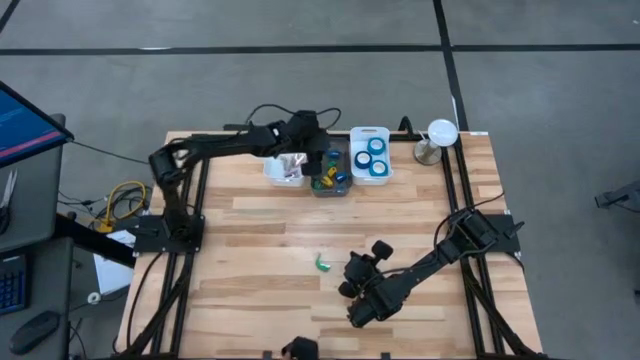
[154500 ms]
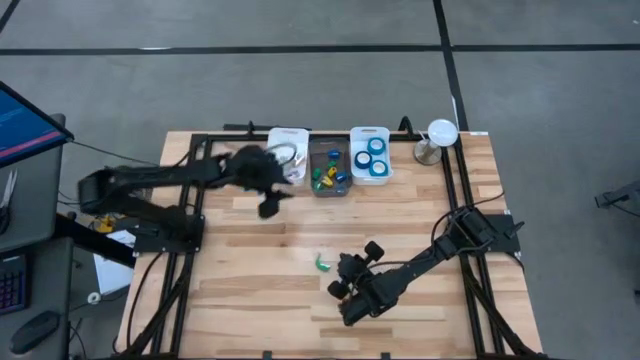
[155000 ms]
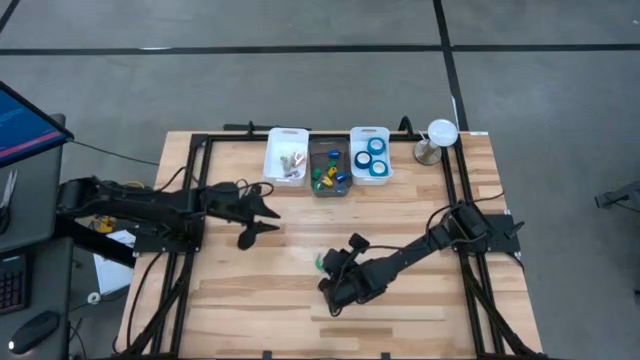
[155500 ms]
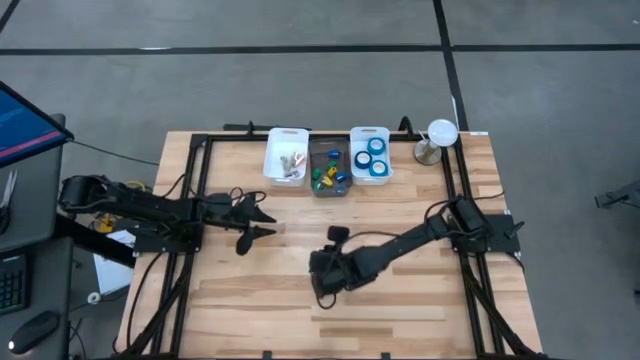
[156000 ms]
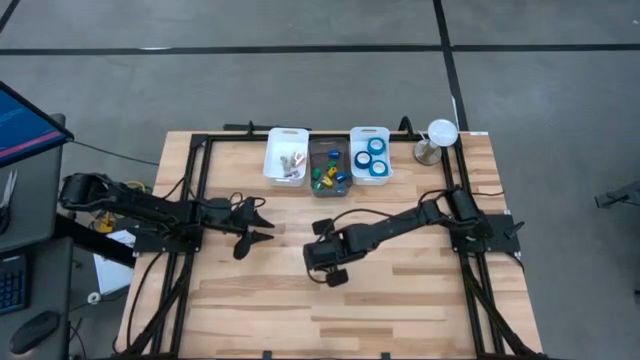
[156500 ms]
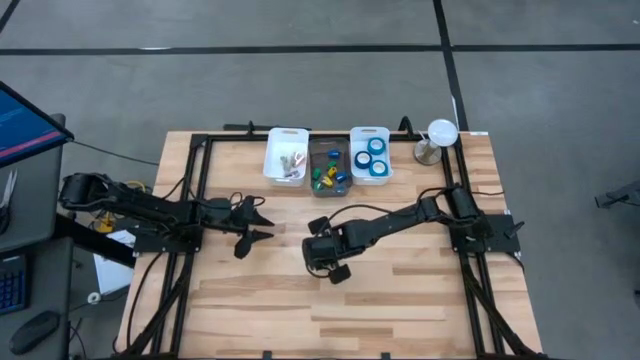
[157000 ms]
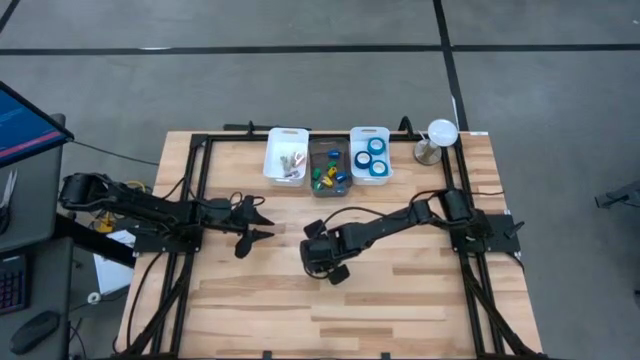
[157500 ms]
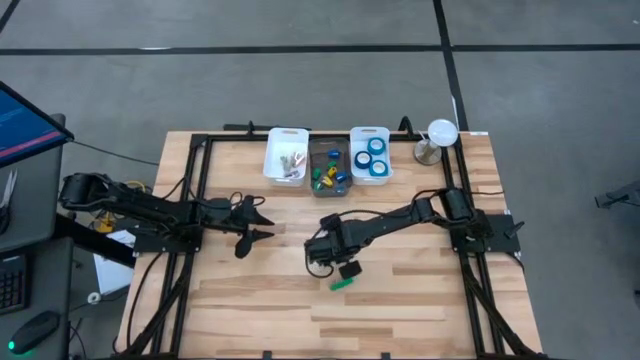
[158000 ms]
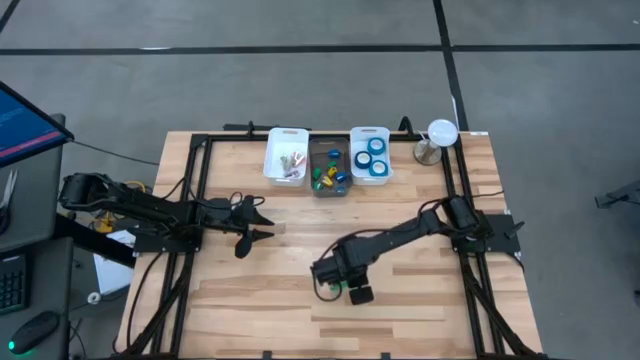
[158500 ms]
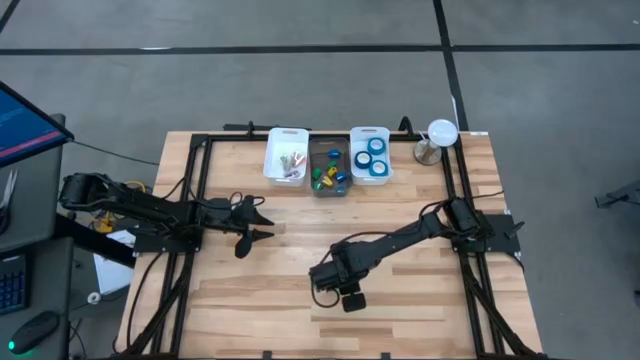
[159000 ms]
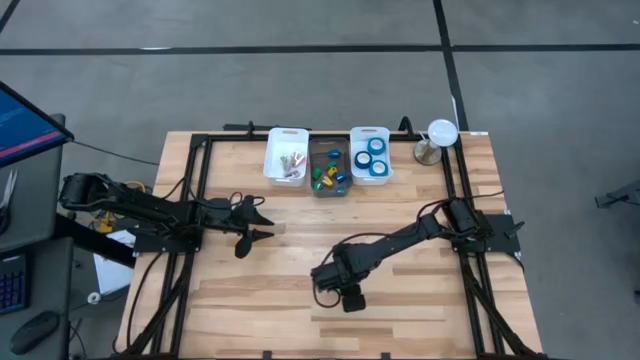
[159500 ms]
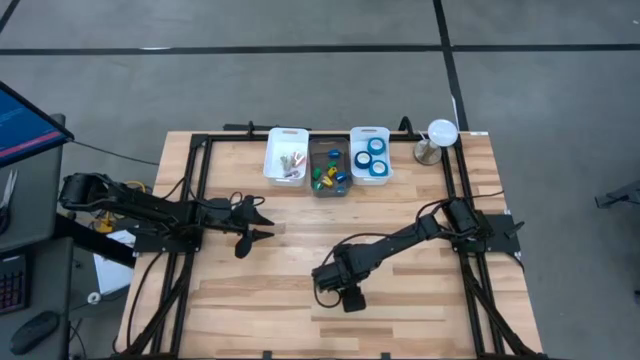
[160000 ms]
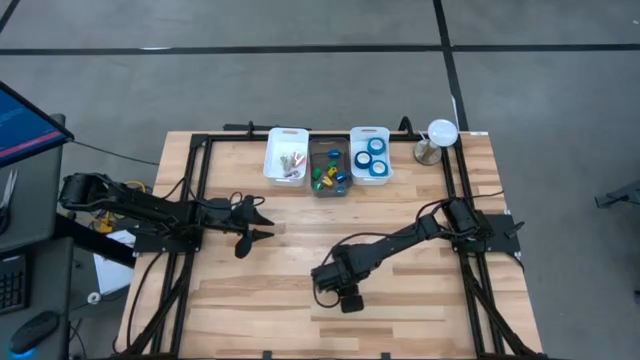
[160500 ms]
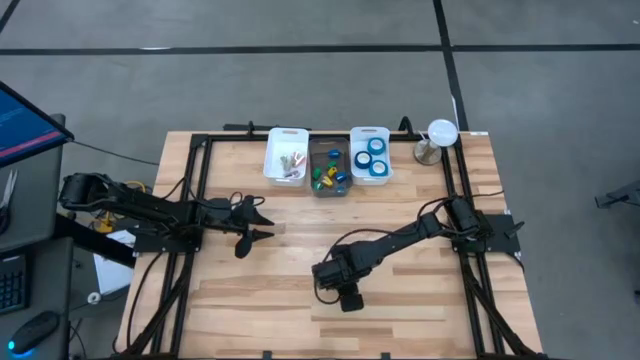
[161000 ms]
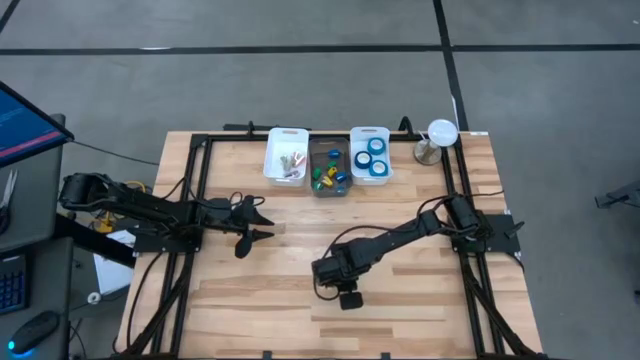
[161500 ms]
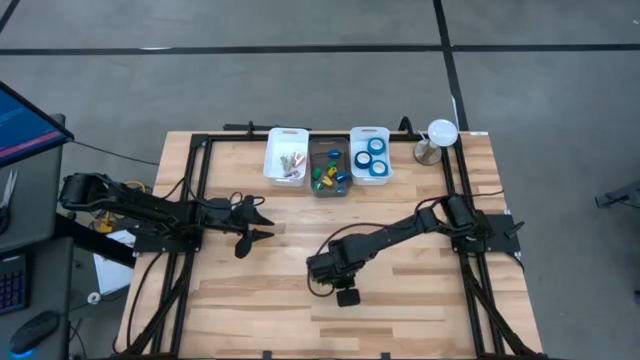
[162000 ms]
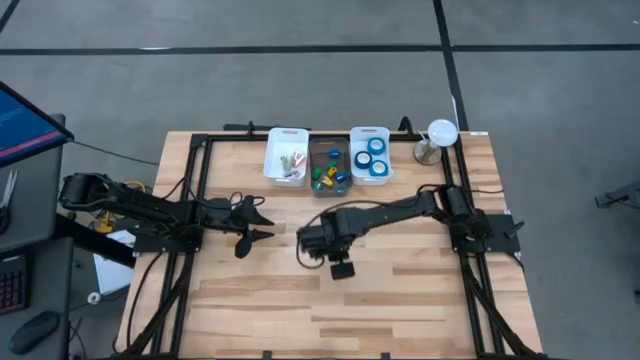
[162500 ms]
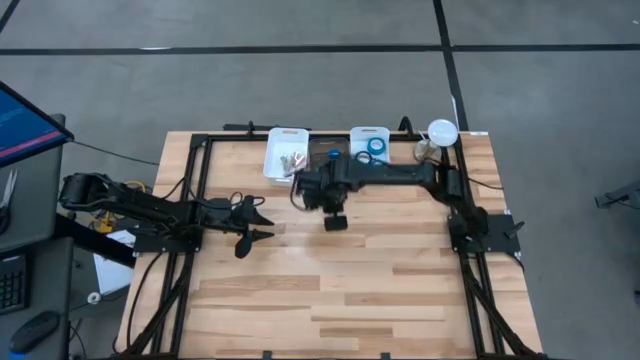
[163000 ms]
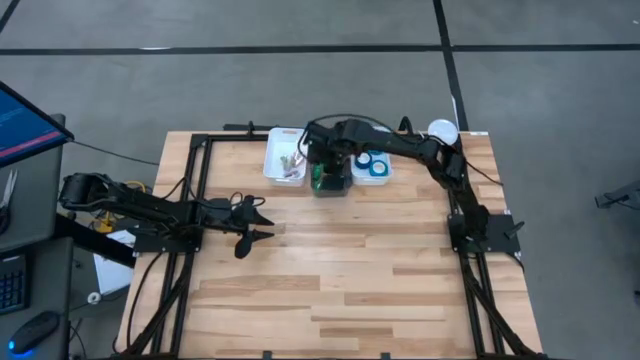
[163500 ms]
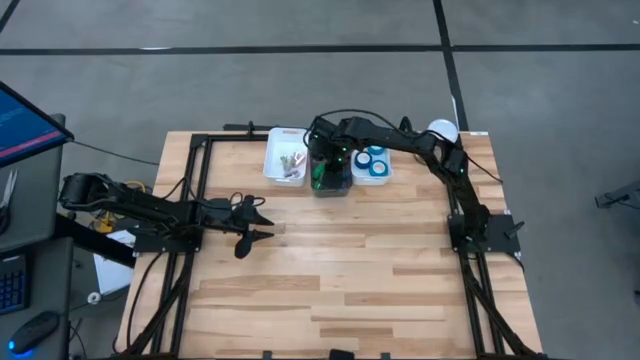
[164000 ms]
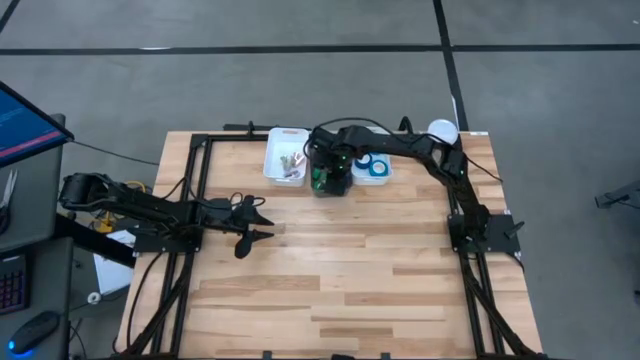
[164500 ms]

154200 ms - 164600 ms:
Task: Pick and place Stapler, Stapler remover, tape
Put the green stapler into the black bin

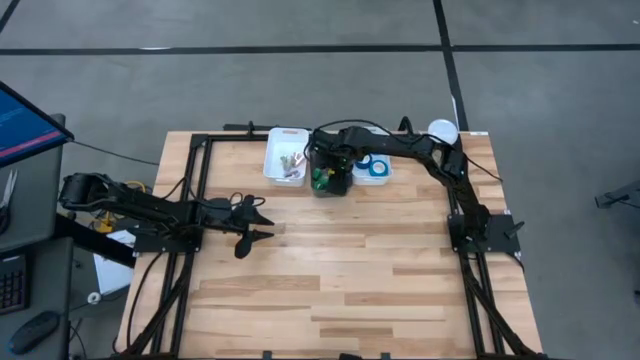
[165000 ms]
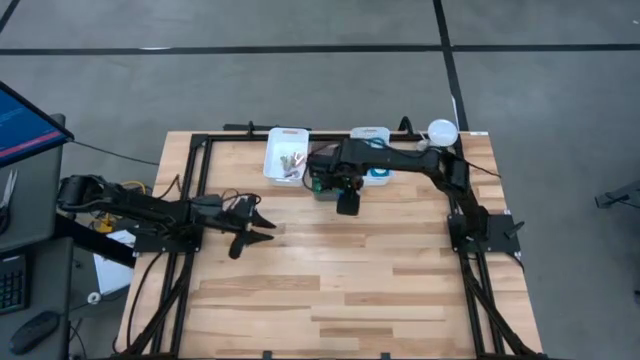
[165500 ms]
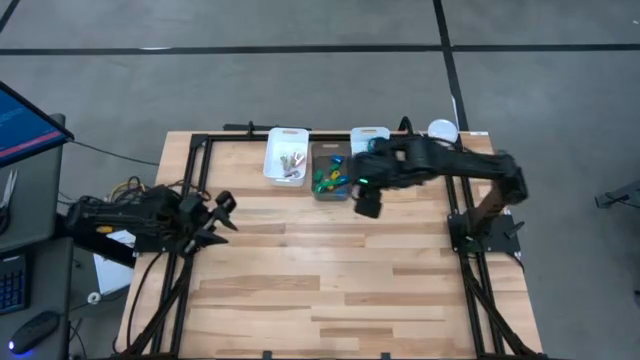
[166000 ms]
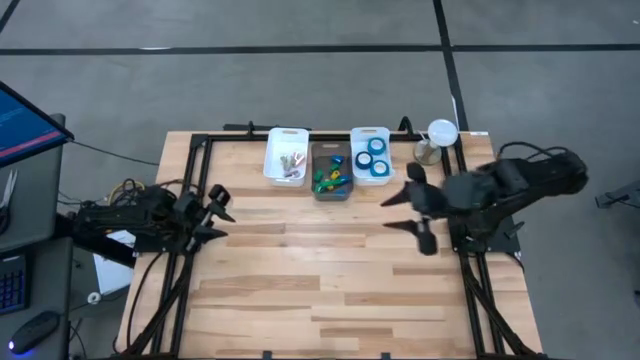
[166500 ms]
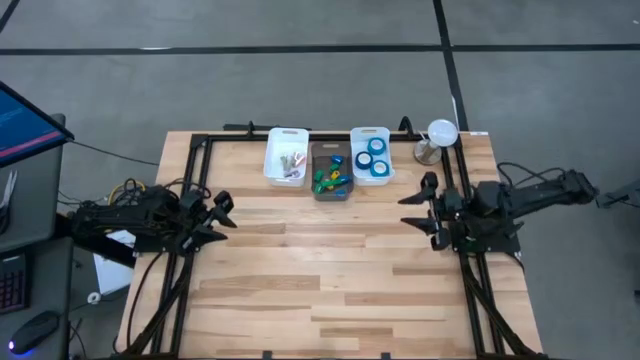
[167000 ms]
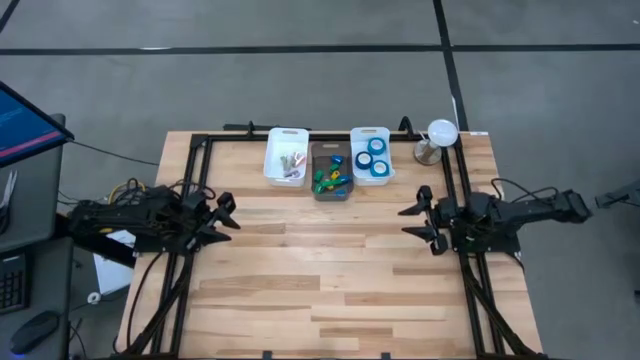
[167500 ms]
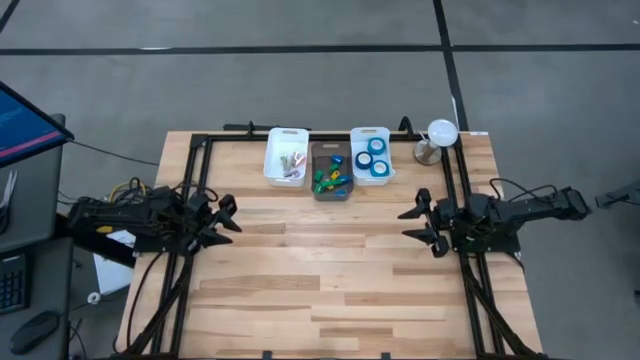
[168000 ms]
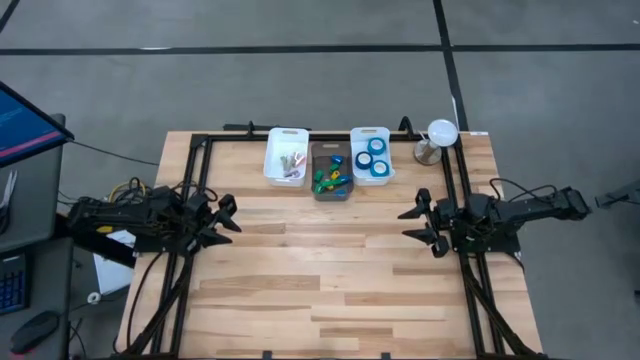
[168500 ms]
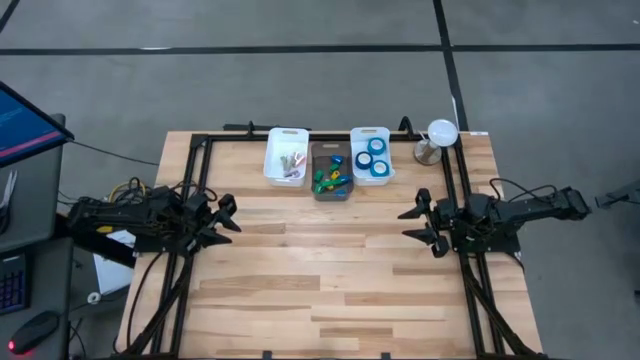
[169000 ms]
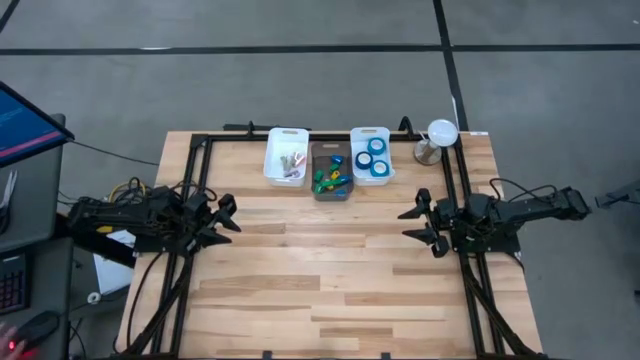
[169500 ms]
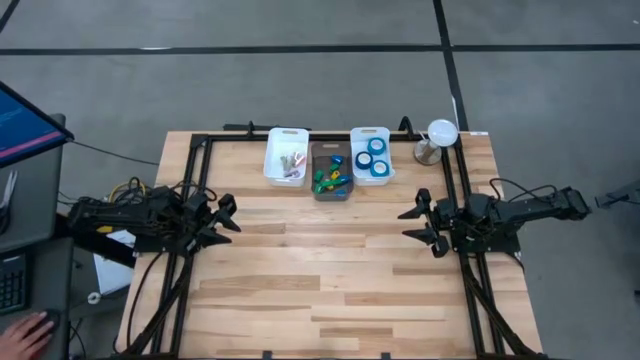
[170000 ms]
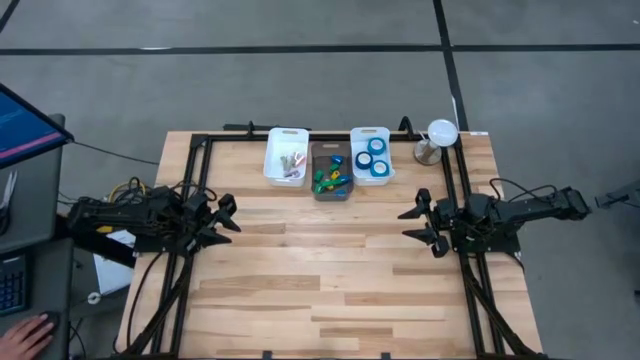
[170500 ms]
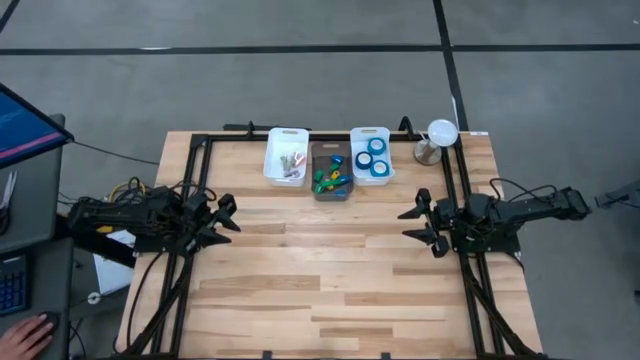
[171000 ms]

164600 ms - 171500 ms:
Return to Home Position

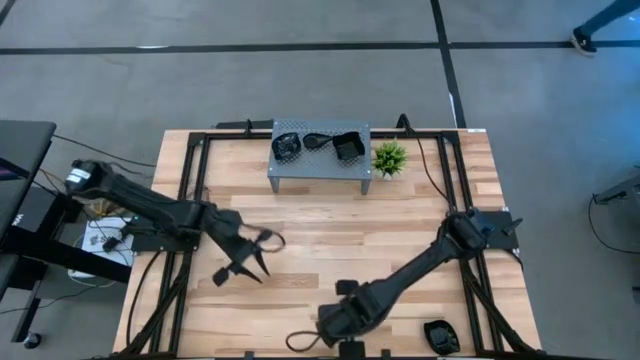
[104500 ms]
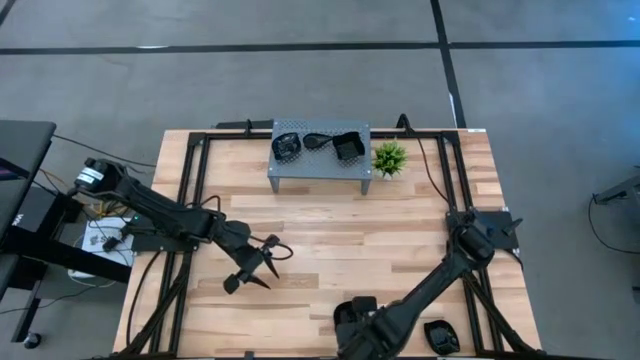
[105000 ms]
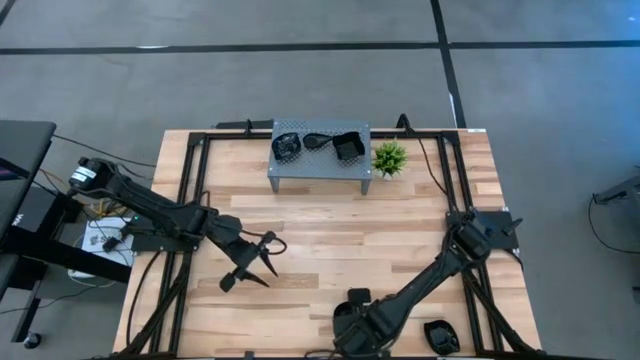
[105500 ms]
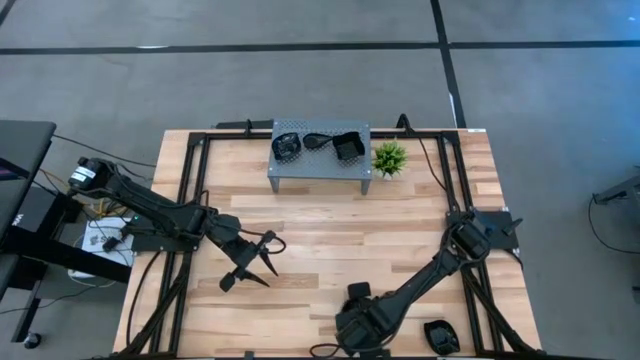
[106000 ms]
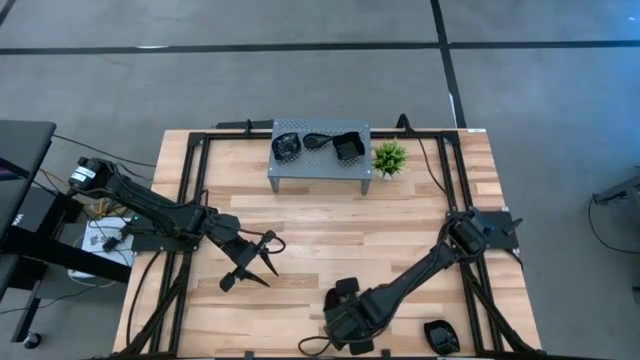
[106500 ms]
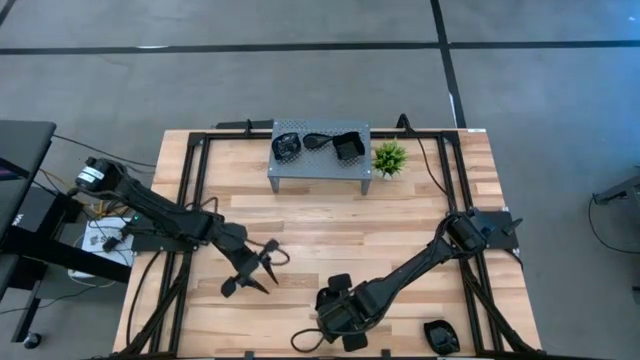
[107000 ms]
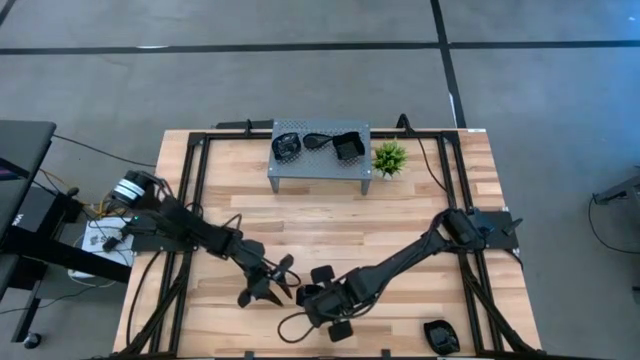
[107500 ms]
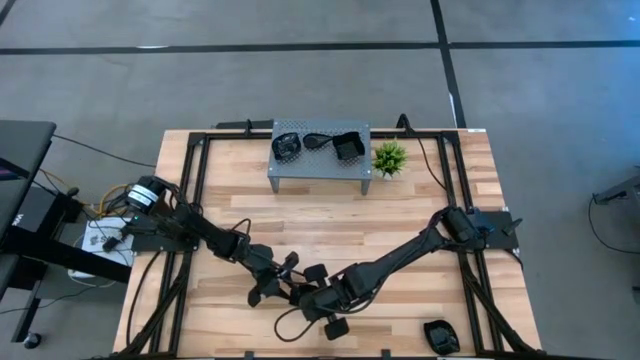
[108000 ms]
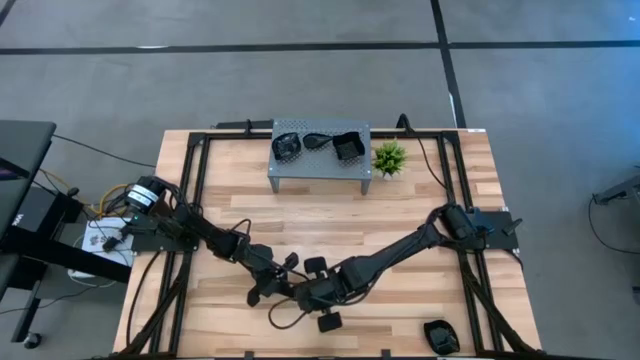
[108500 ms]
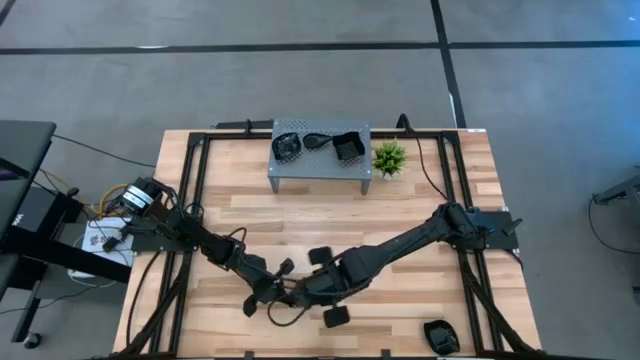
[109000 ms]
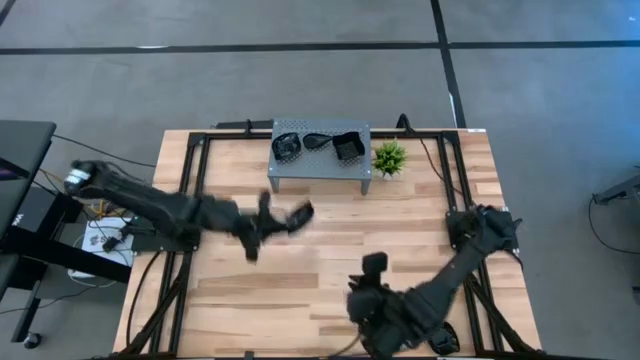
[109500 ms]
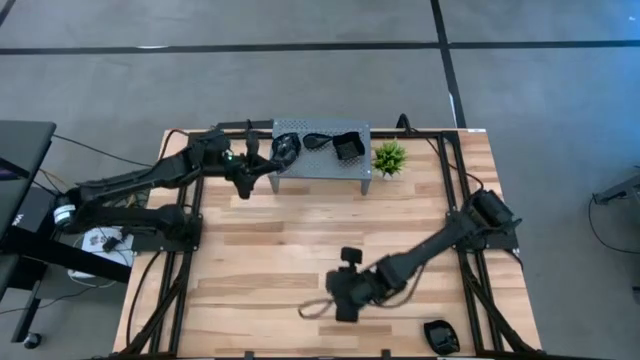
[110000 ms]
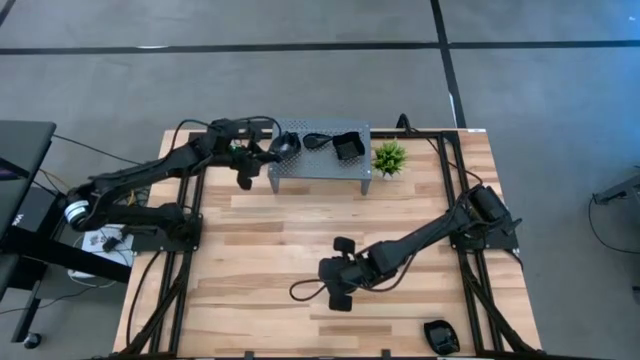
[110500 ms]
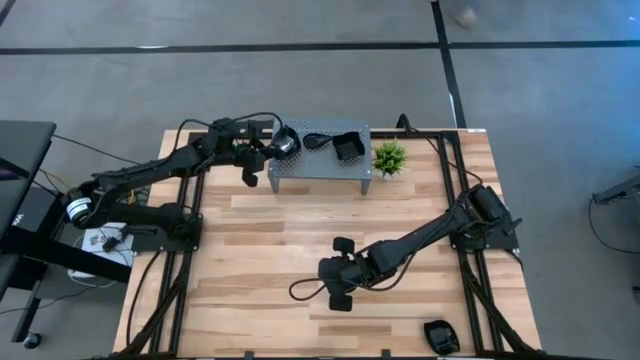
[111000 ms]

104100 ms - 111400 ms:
Task: Pick & Place Mini shaped plates
Stack the leaf-shaped plate on top of the leaf-shaped plate on the shelf
